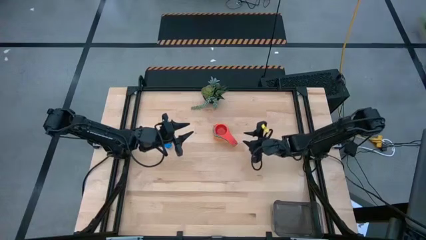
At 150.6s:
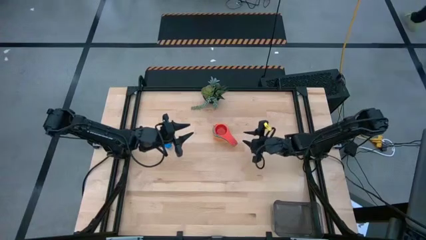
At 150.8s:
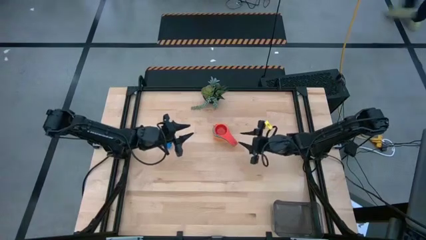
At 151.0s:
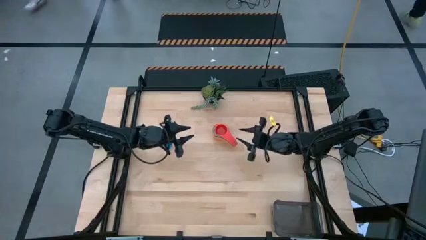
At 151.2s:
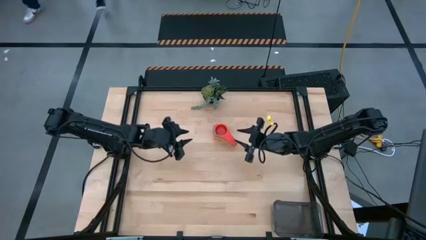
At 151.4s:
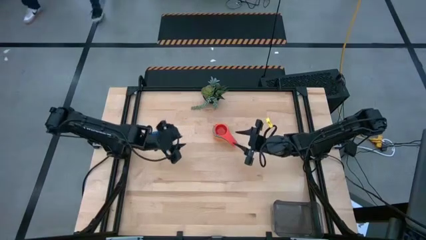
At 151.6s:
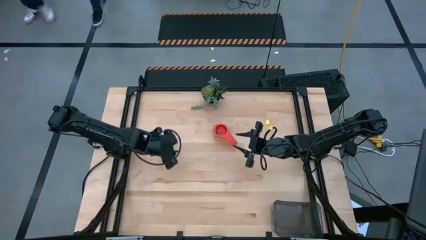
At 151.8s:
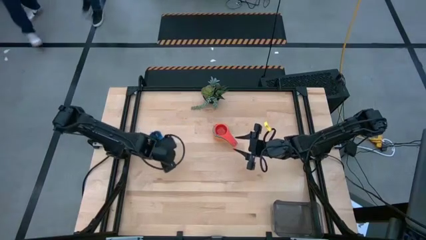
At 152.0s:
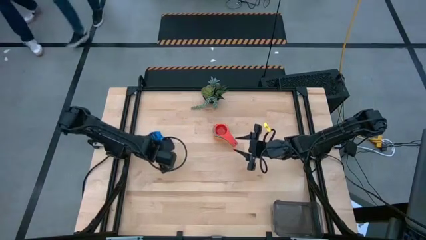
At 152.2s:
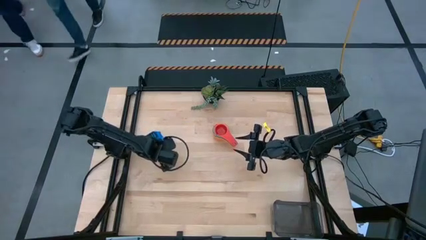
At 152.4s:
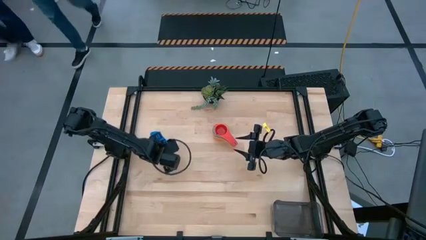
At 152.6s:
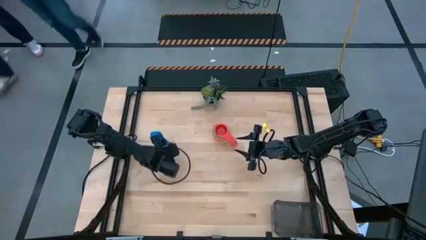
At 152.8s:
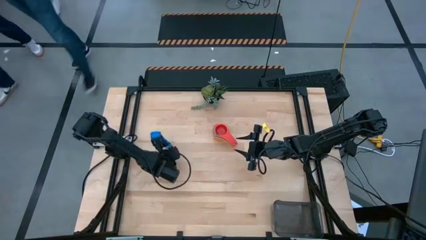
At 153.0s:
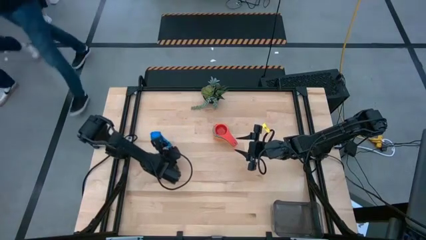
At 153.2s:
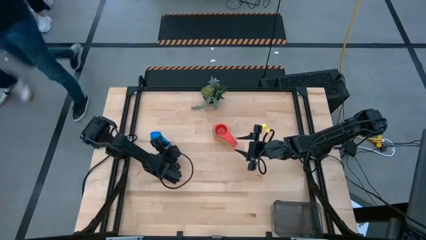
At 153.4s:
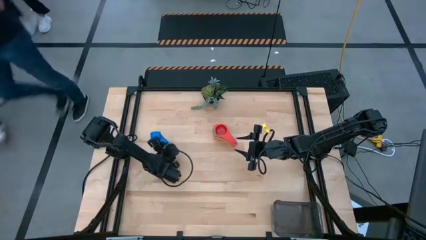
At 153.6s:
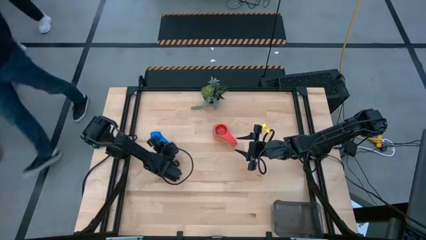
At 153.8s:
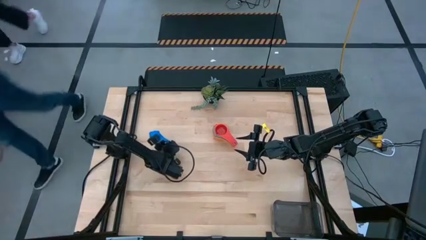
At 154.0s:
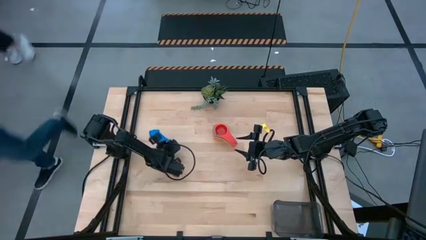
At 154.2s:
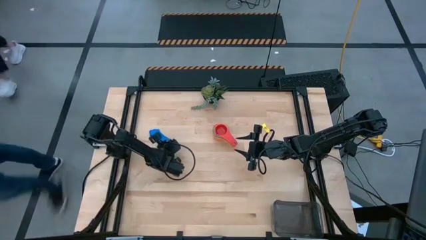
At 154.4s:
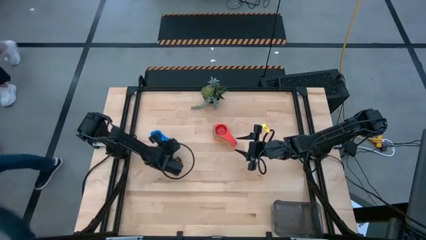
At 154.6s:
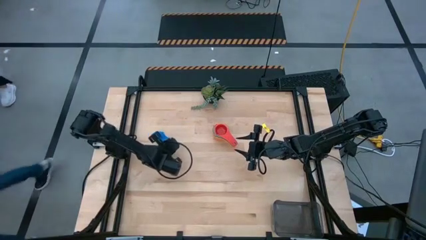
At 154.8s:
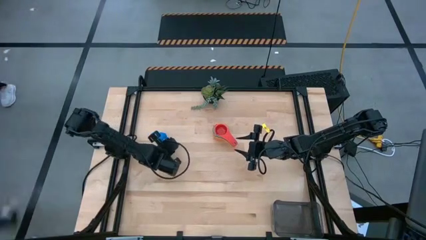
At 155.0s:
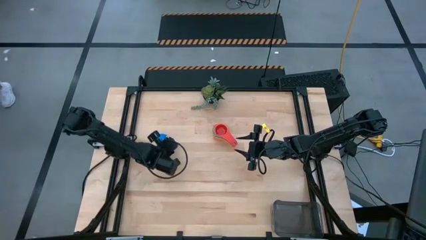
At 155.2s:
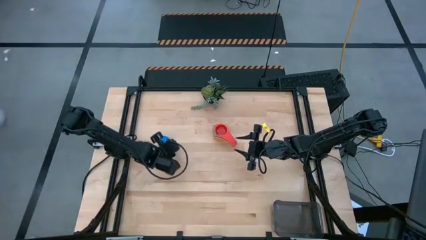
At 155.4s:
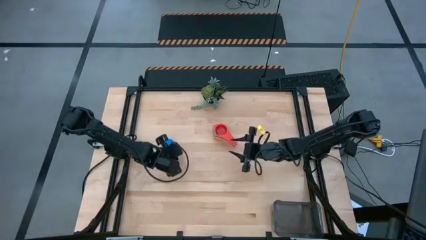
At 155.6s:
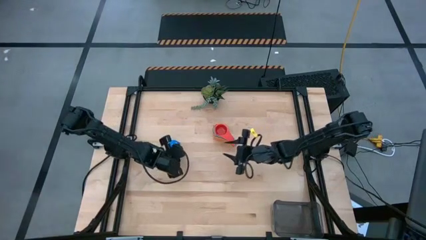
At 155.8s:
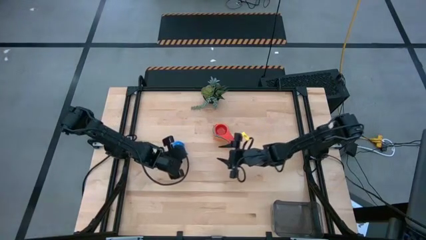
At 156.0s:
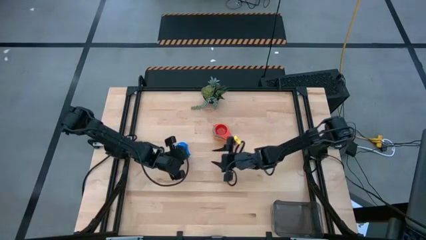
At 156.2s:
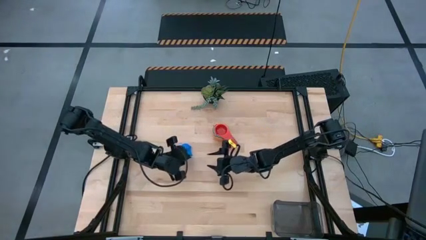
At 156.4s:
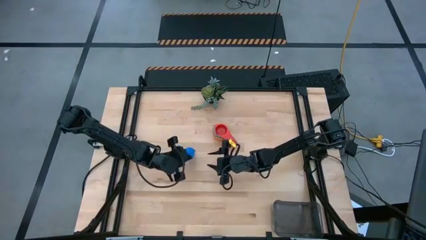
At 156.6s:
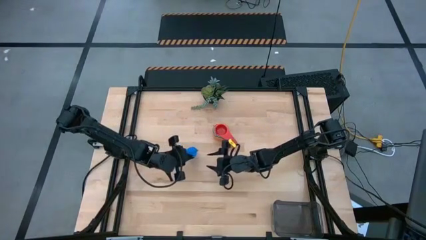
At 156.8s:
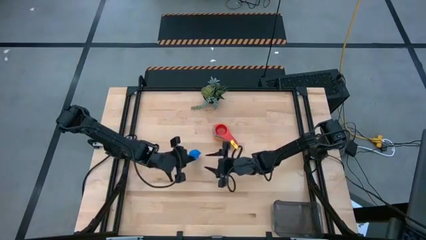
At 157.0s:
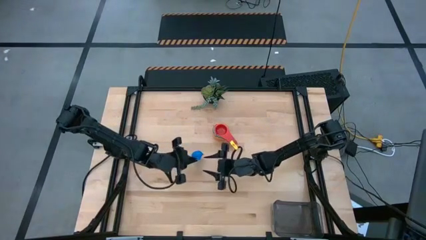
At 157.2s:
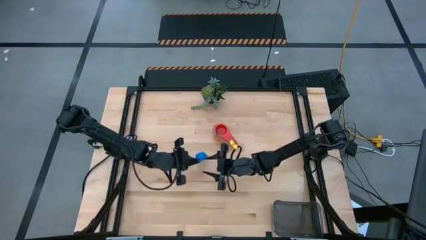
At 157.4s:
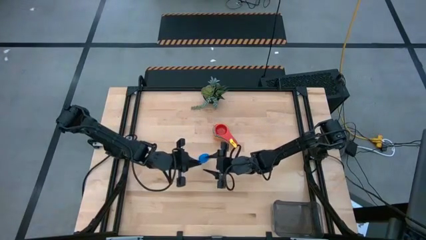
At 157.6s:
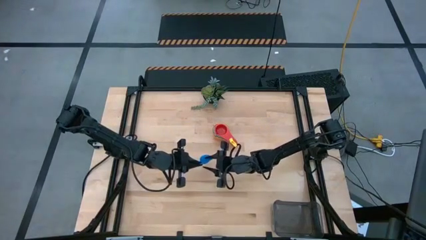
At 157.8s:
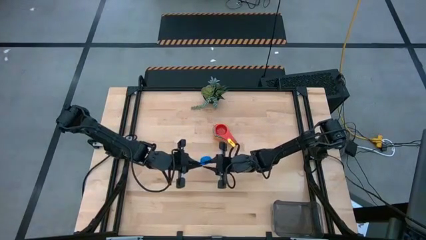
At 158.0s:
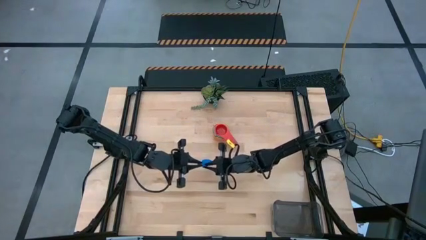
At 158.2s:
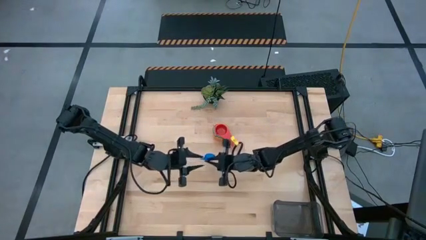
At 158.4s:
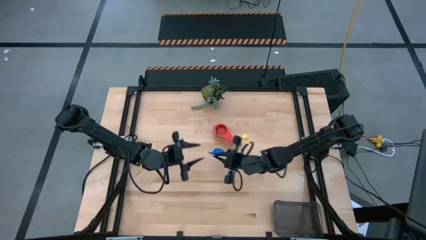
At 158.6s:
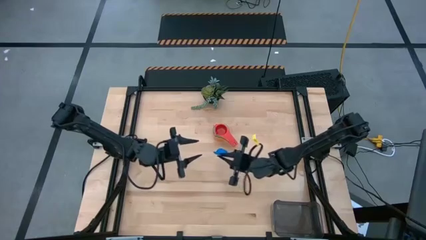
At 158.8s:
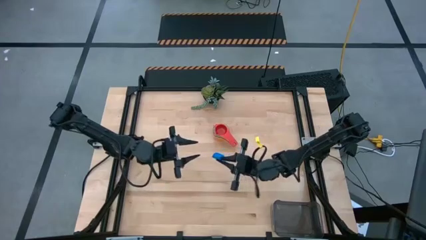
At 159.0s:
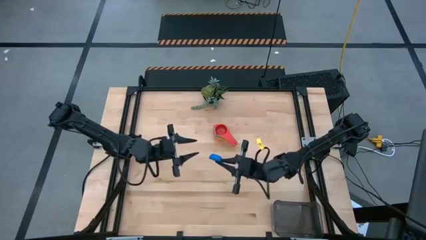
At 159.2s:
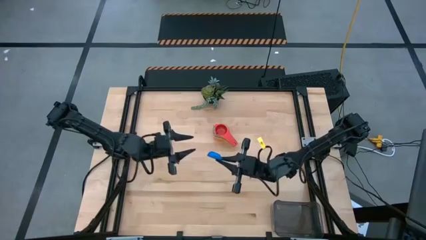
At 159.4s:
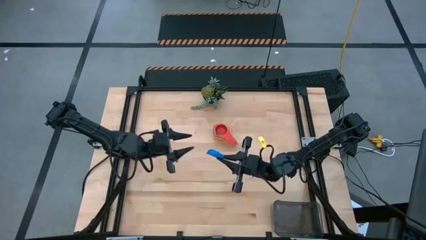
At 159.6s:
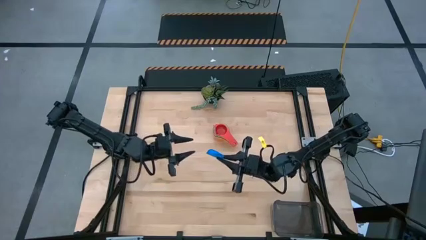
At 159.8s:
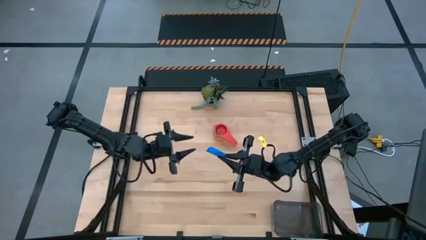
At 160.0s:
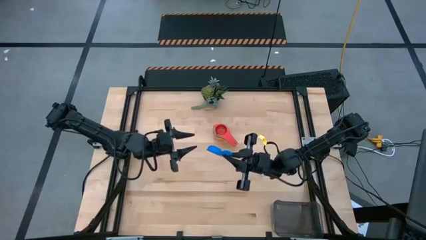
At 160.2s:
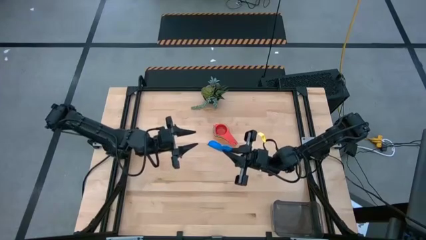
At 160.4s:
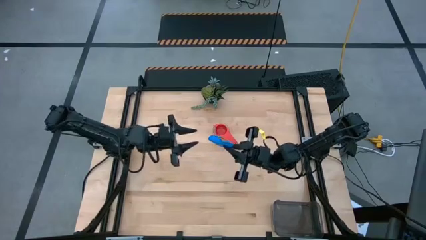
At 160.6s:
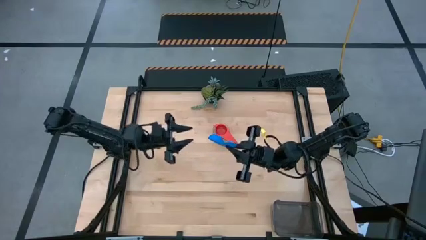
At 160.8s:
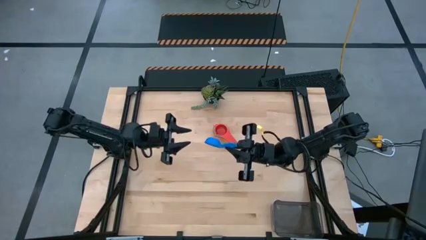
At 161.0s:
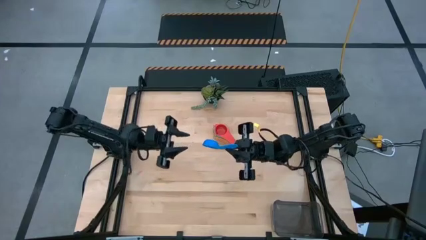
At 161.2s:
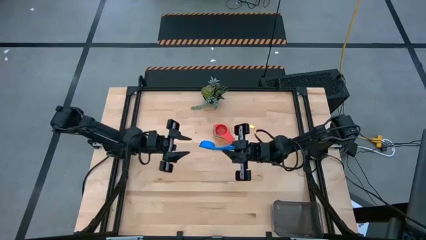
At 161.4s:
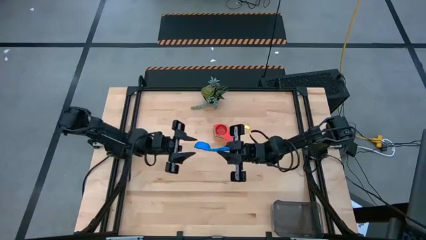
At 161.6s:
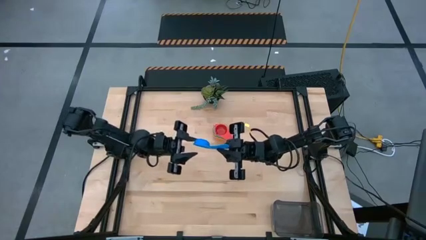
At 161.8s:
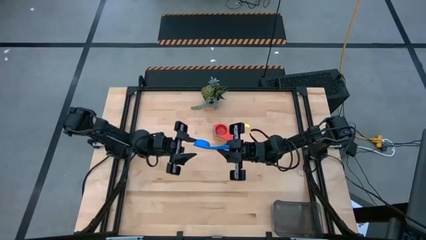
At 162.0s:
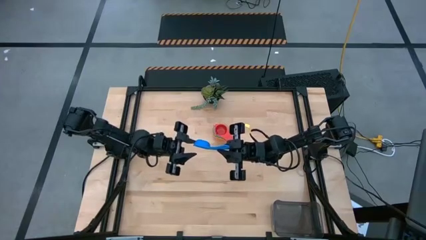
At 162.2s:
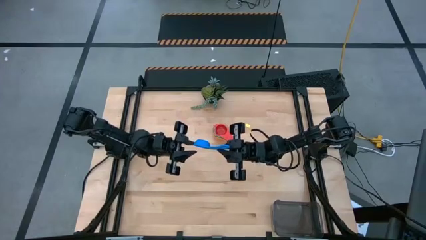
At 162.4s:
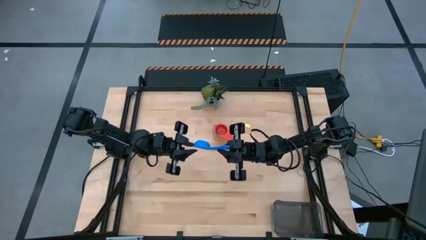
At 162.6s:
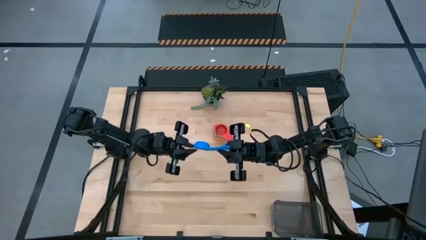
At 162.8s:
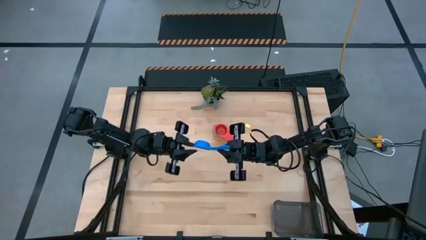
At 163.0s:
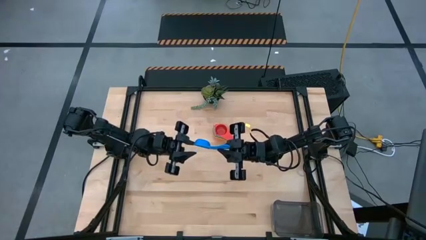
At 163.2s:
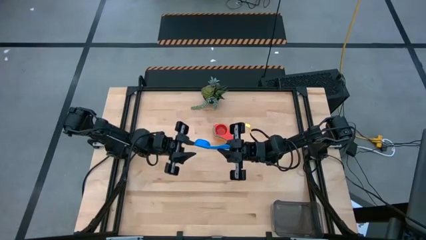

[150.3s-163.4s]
Task: Nest measuring cups in basket
Stack the blue measuring cup on top of the red measuring cup

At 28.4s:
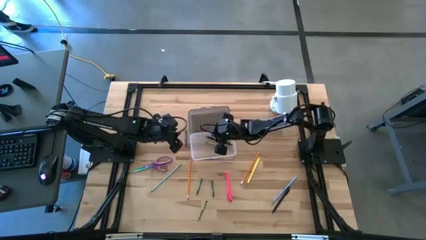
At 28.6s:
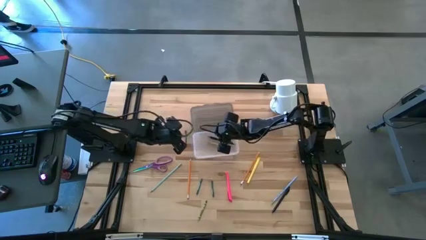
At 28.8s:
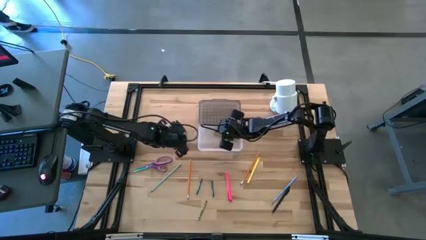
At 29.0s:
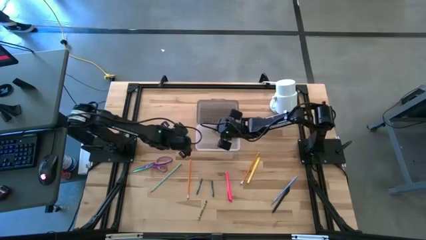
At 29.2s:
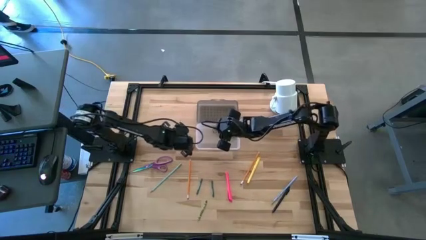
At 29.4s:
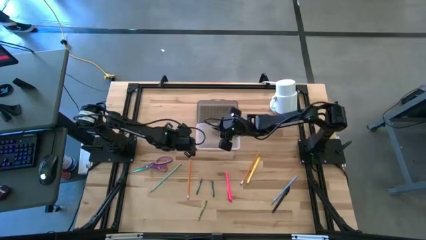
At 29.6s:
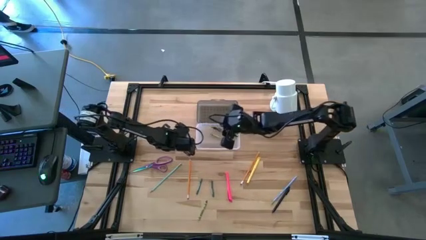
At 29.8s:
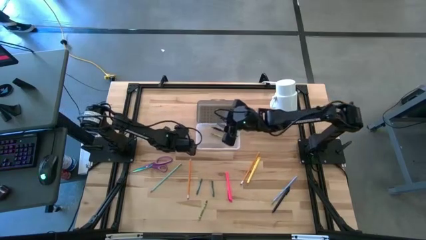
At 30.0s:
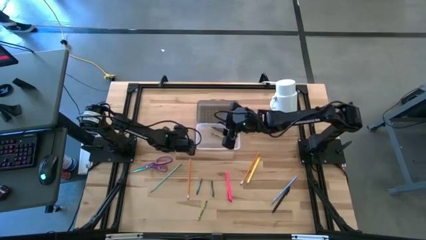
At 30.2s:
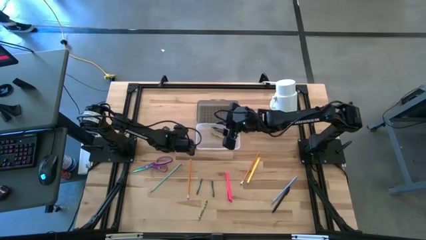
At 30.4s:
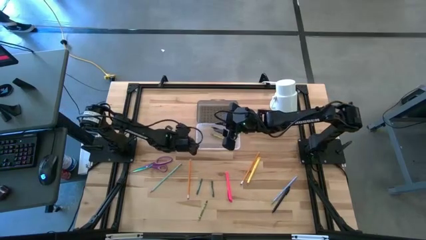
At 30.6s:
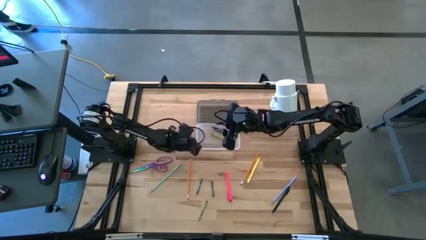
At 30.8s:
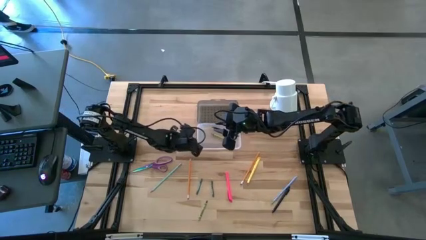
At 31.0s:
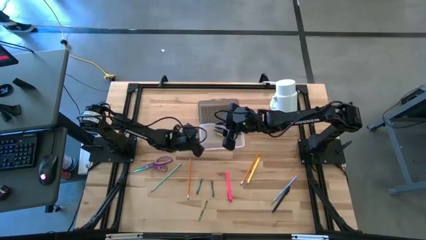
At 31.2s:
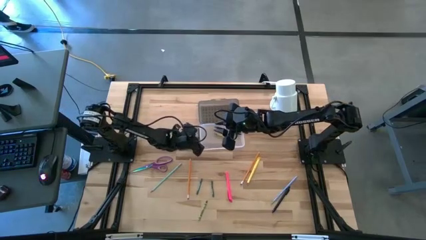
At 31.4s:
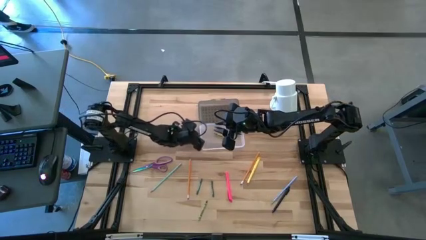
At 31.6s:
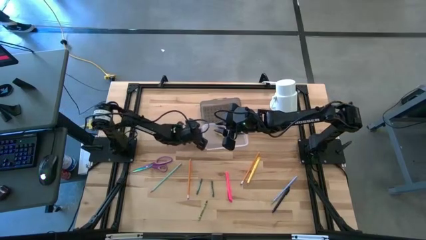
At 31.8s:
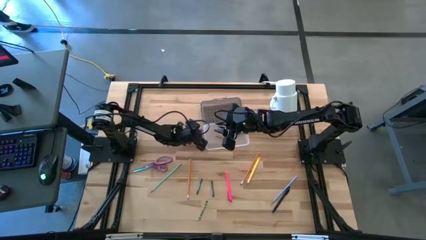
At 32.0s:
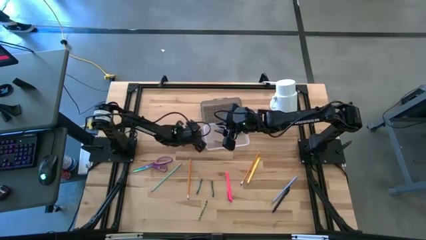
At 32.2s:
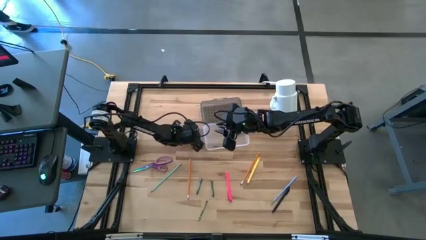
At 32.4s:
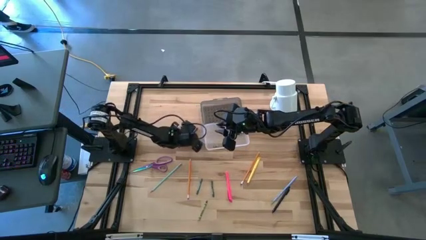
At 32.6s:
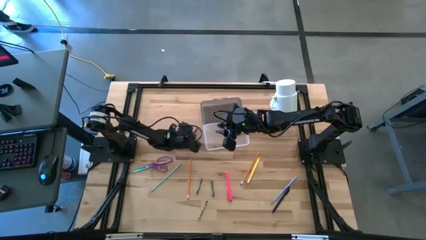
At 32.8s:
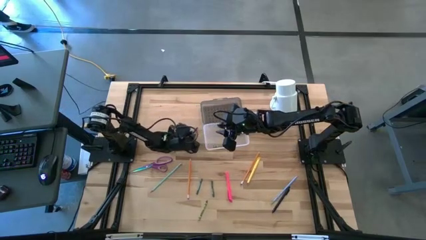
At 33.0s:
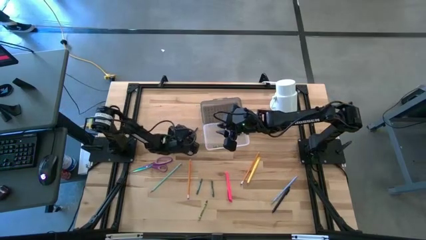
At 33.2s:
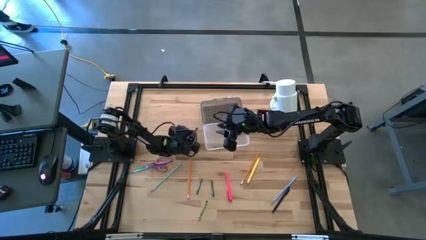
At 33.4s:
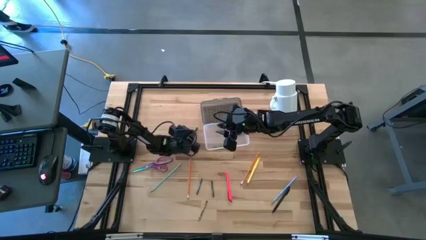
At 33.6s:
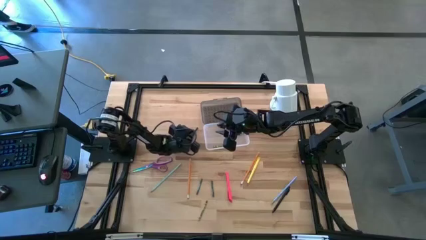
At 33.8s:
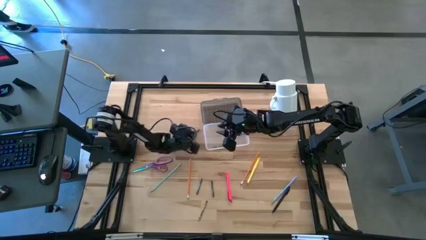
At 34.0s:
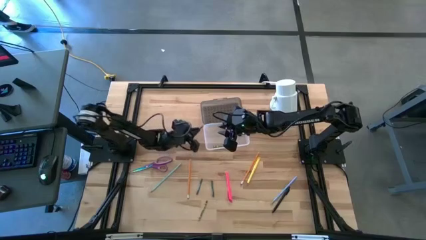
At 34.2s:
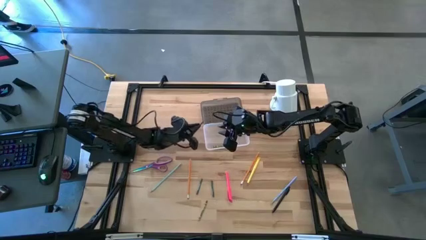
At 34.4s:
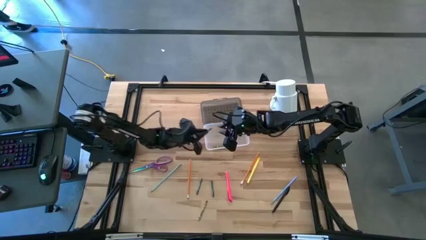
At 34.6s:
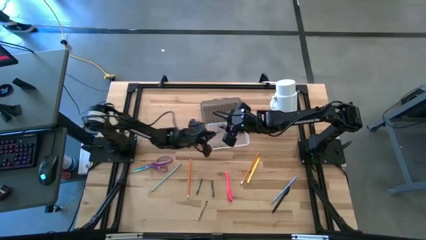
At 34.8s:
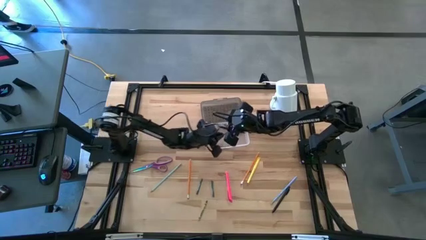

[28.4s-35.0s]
Task: Pick & place school supplies into a supply box
Put the top green crayon into the gray supply box
